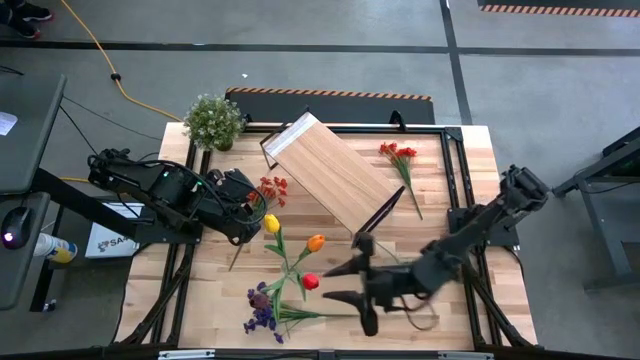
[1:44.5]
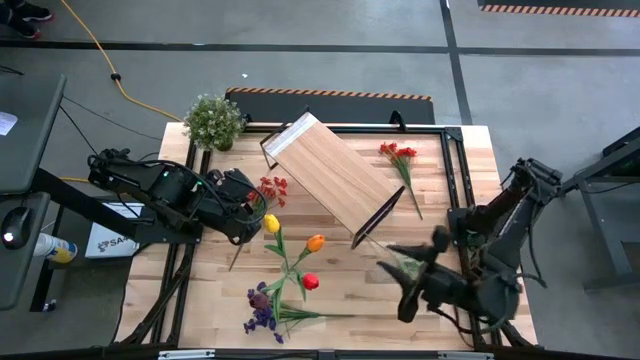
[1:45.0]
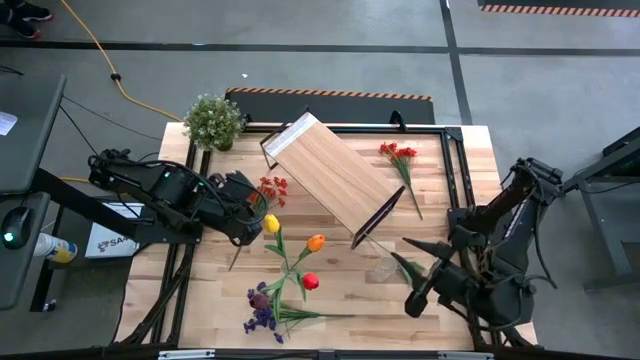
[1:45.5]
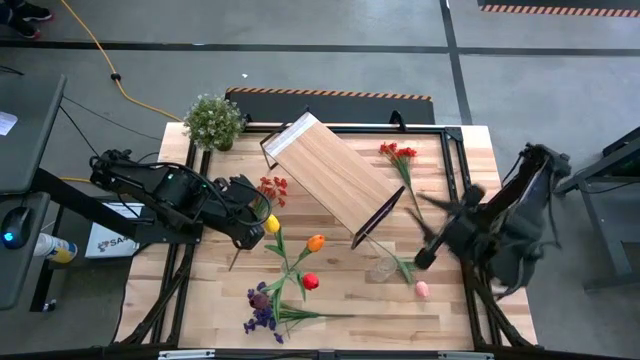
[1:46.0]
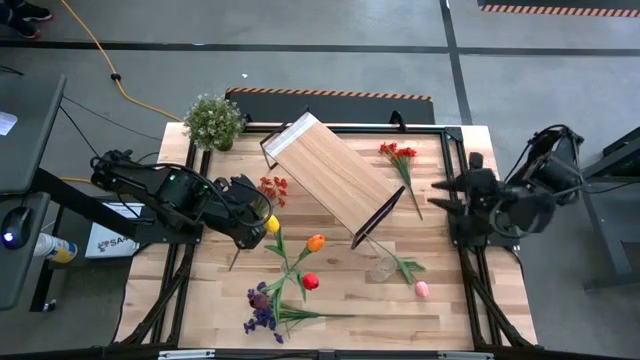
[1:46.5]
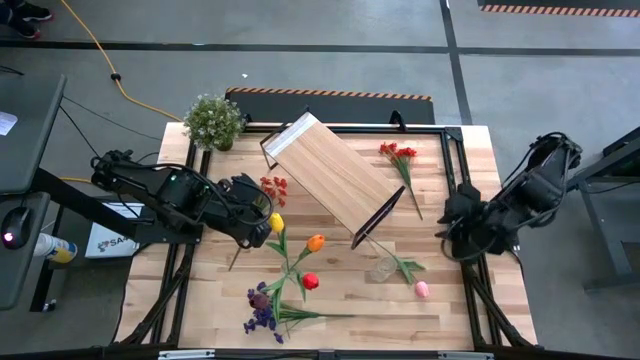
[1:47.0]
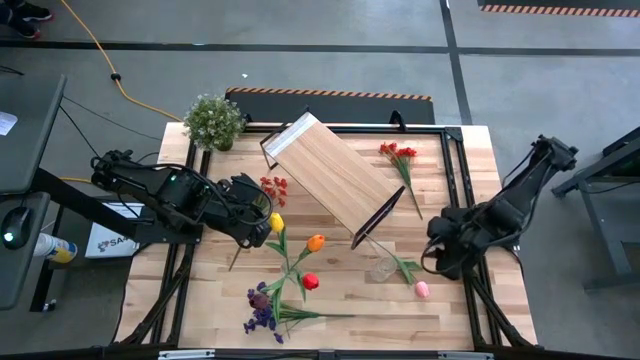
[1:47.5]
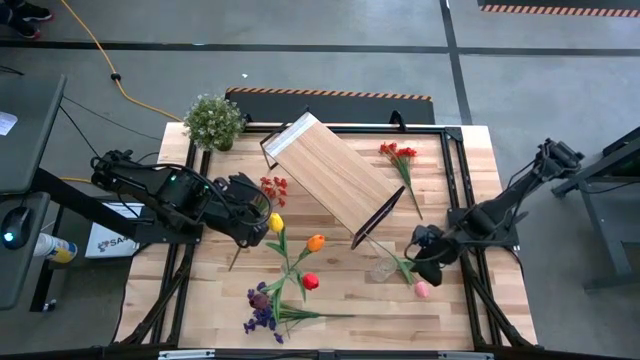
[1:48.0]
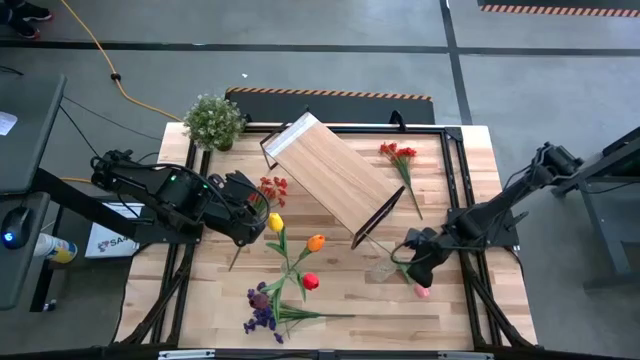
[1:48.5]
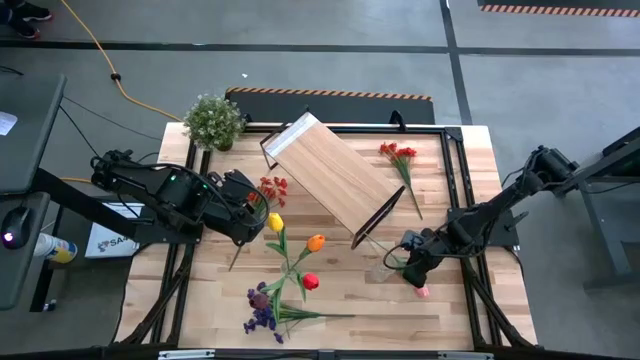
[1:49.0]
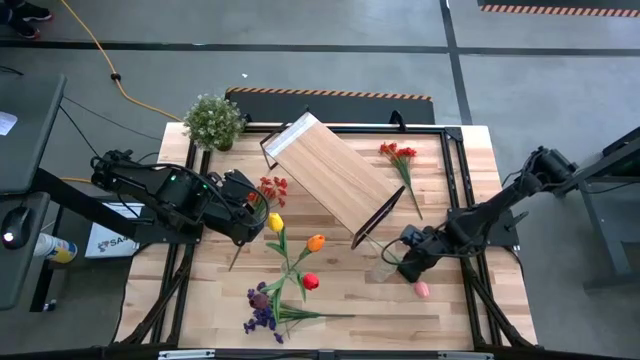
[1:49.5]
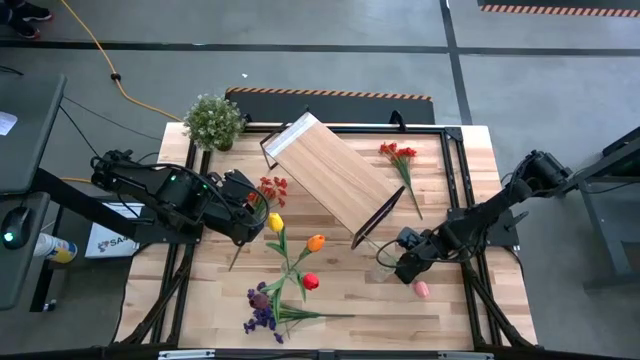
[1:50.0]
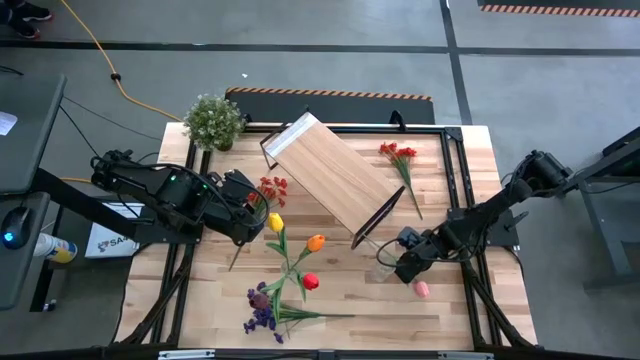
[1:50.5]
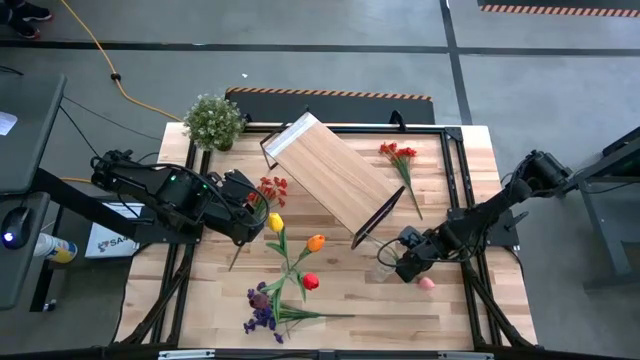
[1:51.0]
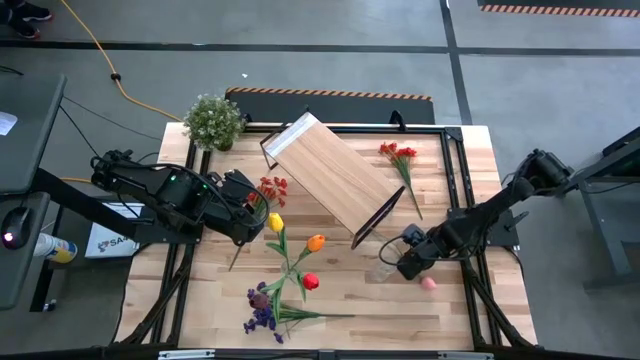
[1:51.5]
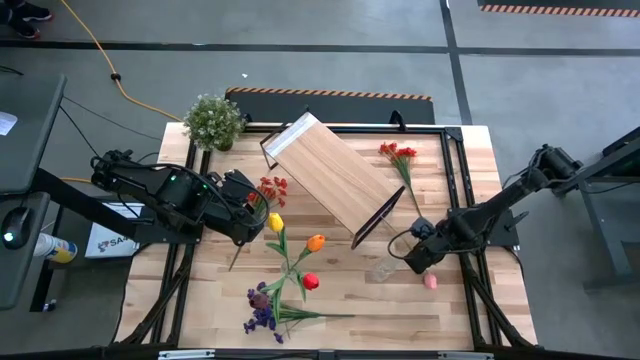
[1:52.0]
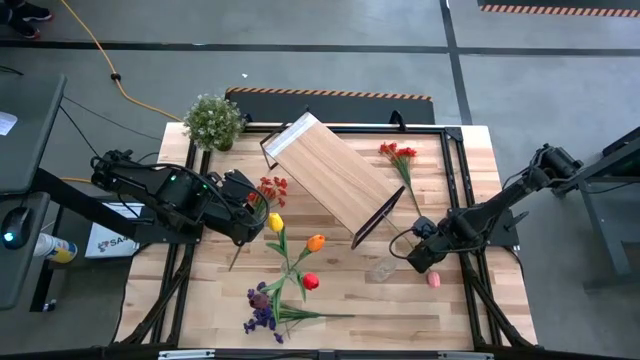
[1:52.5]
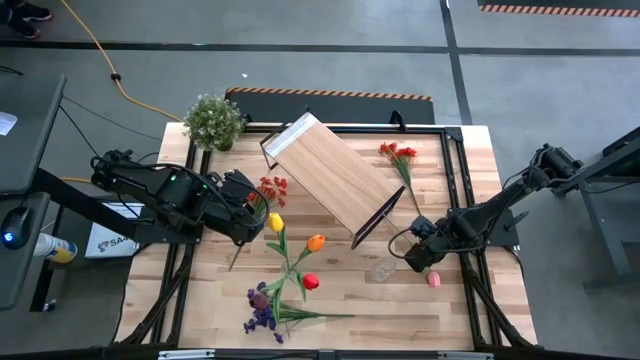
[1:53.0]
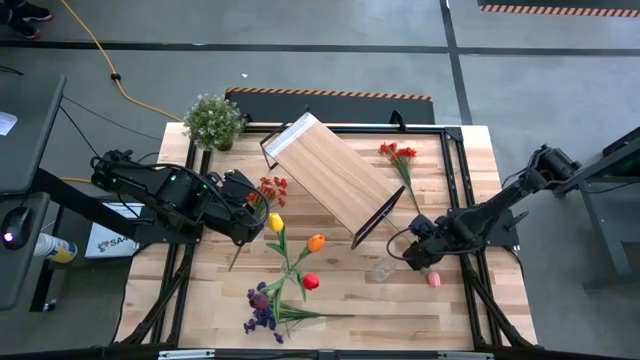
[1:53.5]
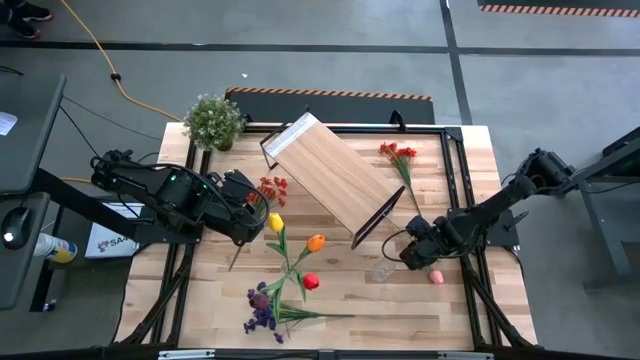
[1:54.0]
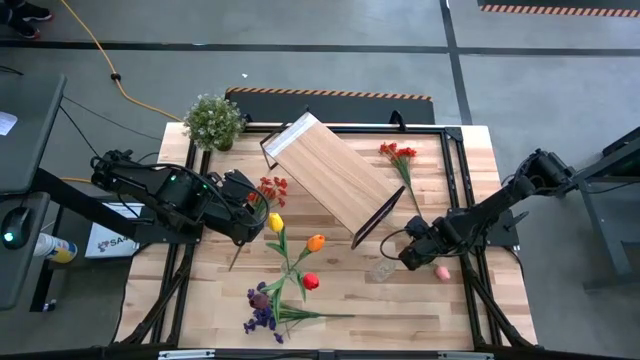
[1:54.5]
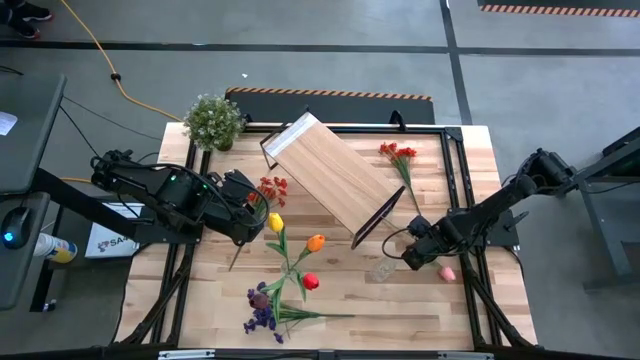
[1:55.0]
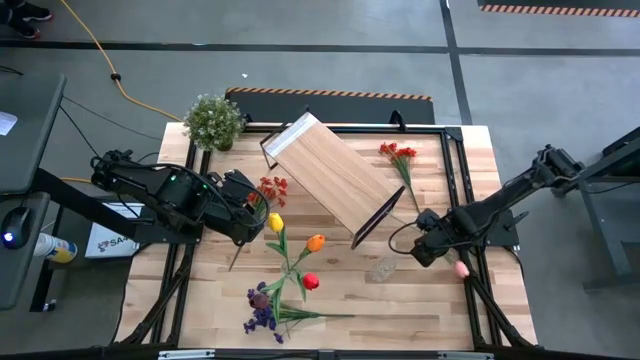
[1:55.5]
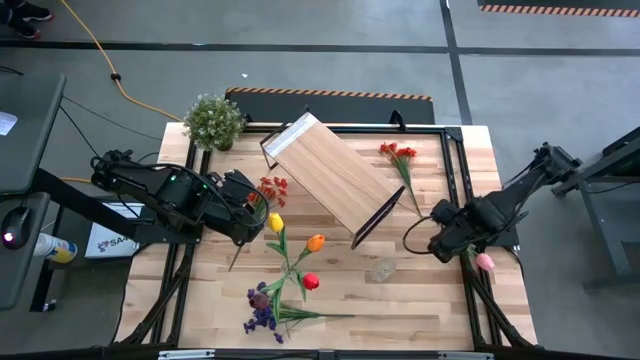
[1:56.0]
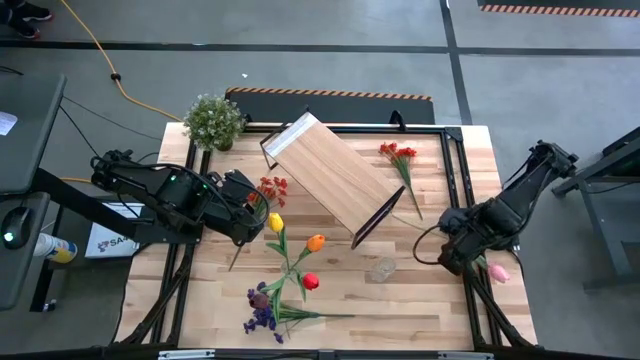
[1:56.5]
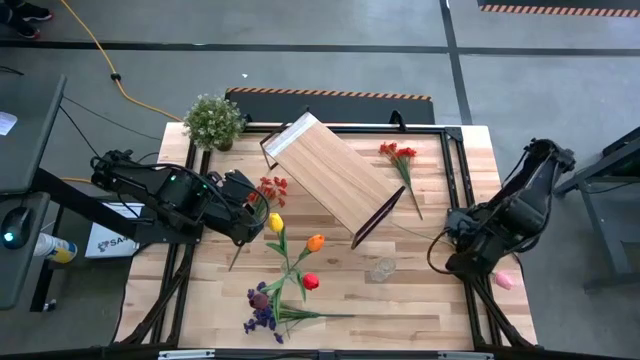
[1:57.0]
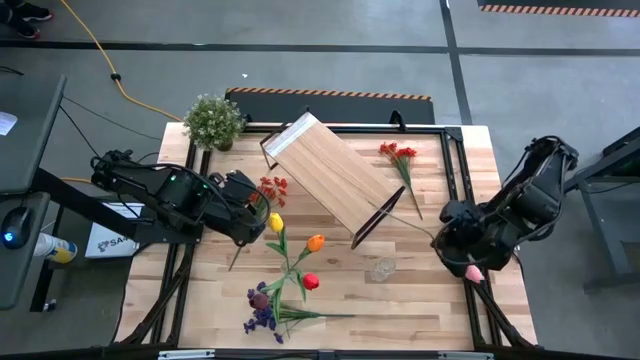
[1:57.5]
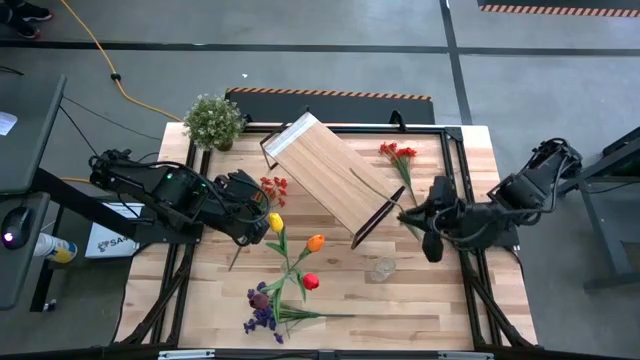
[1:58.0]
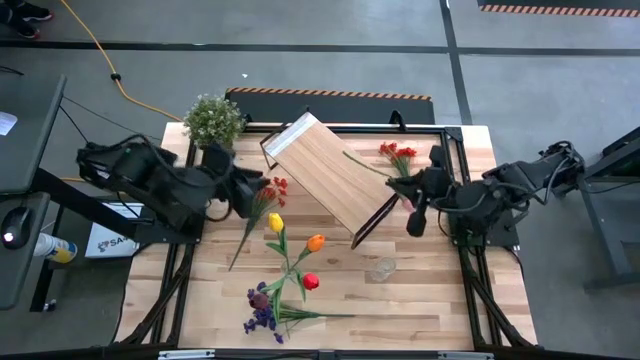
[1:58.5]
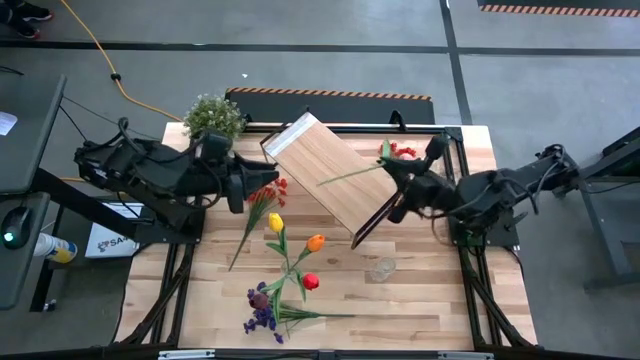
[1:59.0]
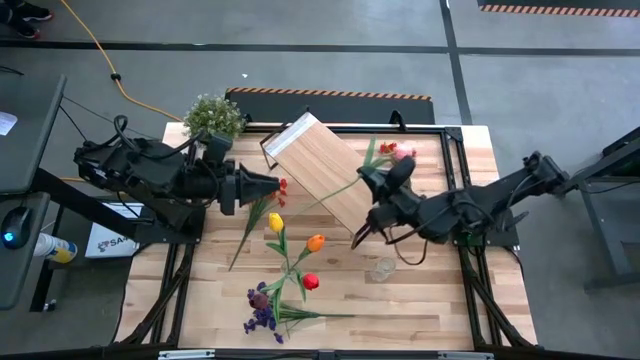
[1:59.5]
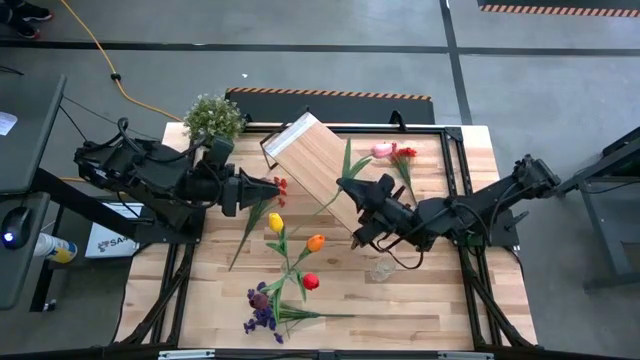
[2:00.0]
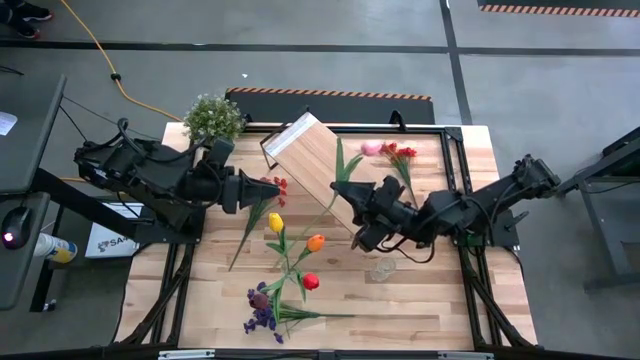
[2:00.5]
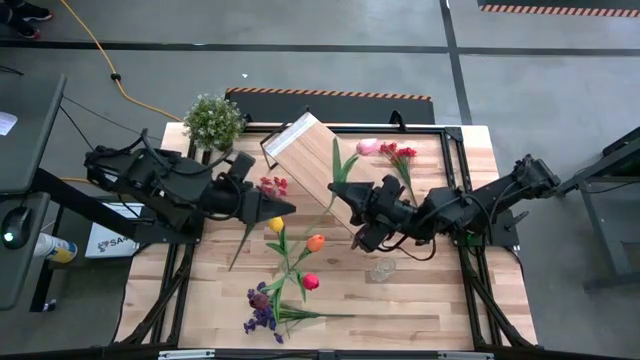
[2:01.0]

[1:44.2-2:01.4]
Task: Pick and place flowers into a vace then onto a shelf
Put the pink tulip into the left transparent vase

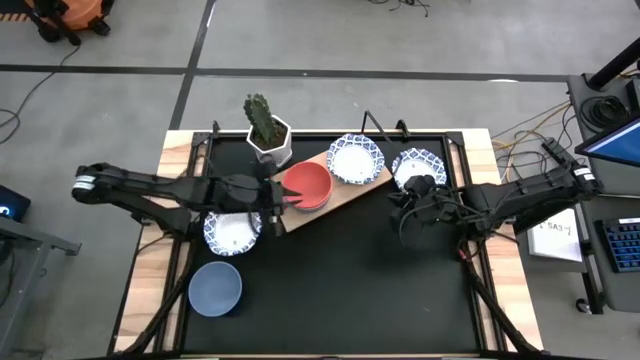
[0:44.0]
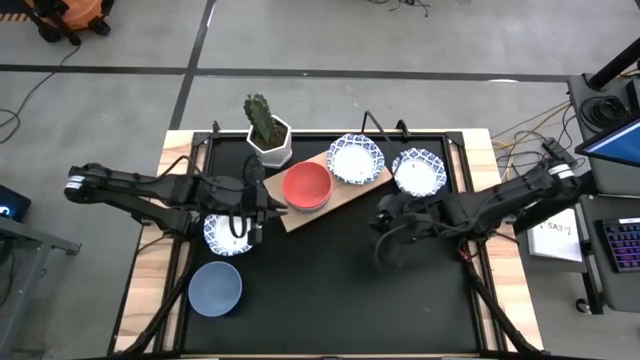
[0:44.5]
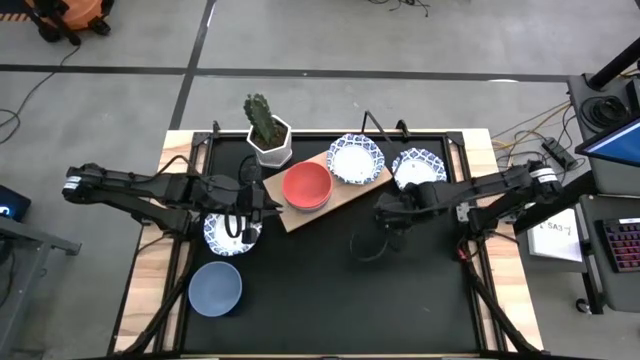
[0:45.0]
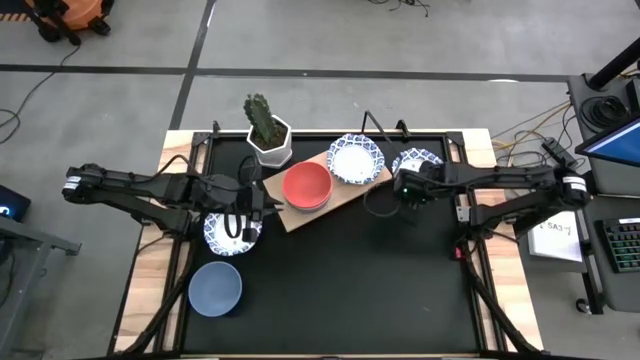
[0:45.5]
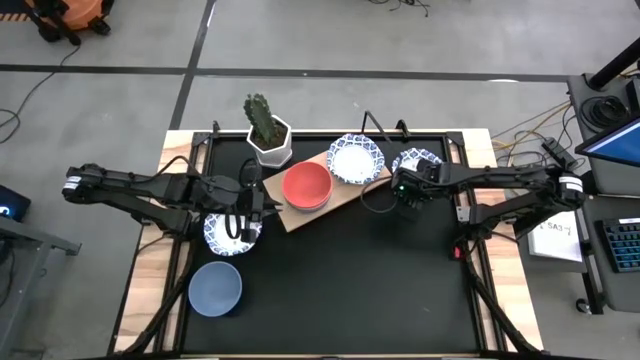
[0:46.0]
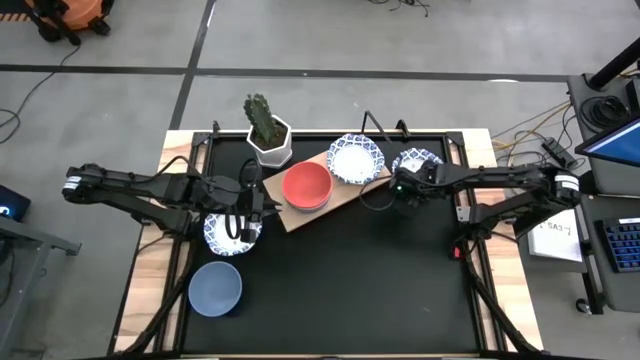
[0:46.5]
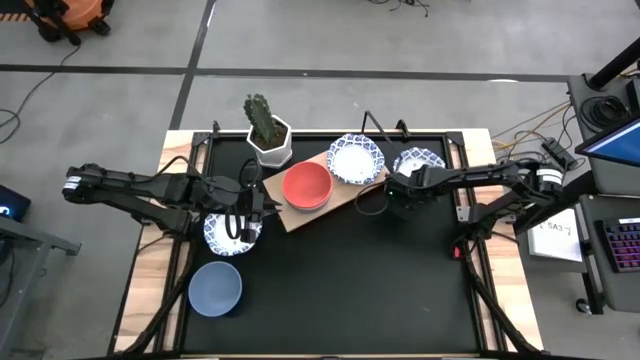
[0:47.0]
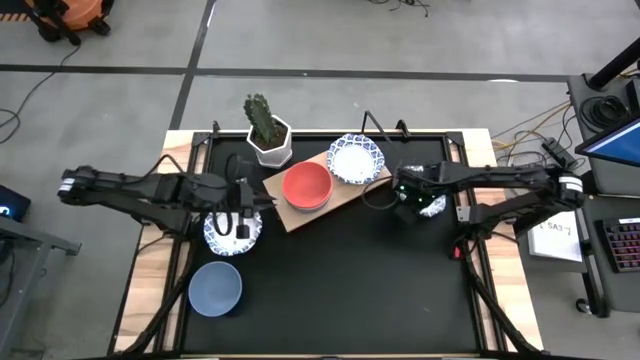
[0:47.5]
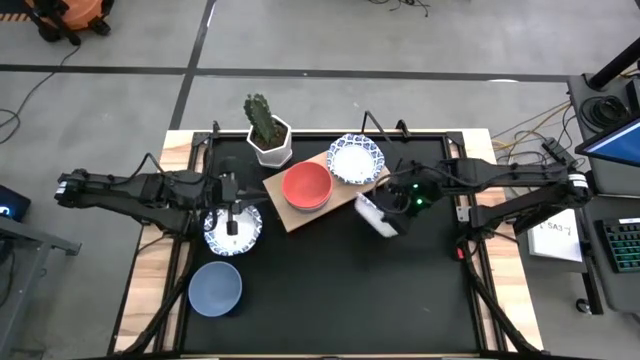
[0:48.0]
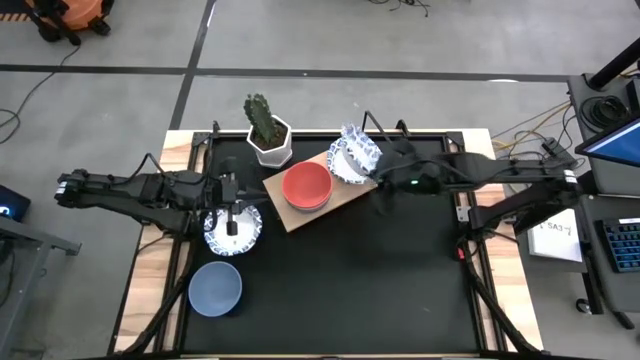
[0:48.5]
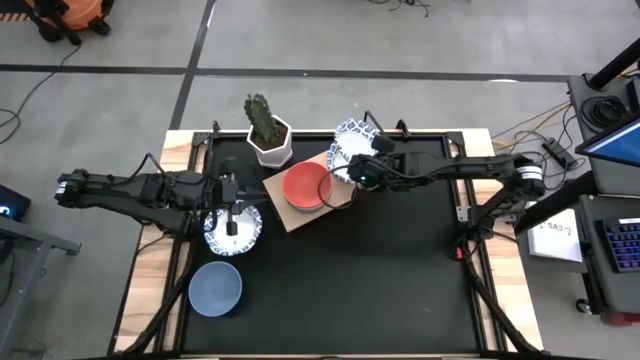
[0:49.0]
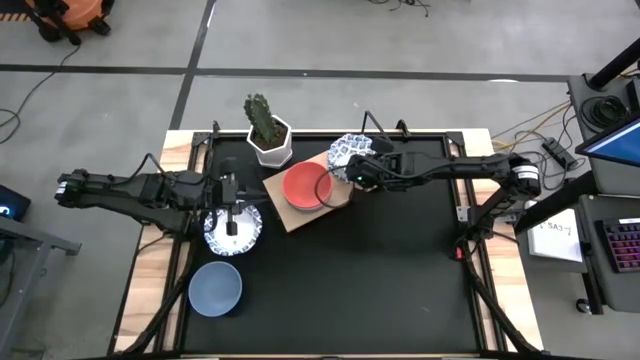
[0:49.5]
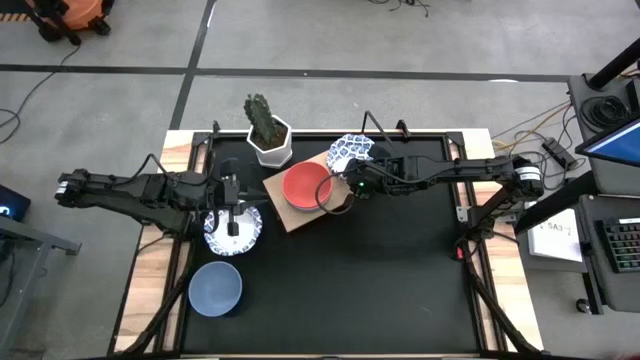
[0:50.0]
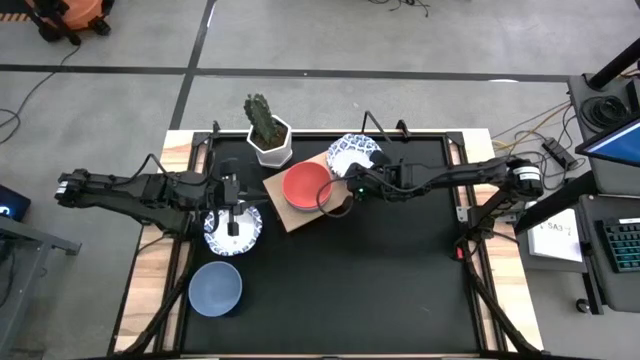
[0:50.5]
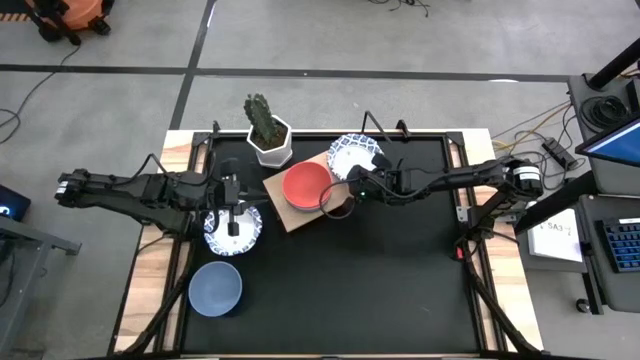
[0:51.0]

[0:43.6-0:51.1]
Task: Place and stack bowls onto a shelf
Stack the white bowl on top of the white bowl on the shelf
